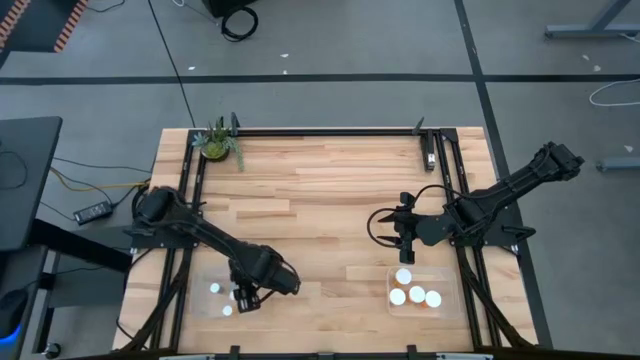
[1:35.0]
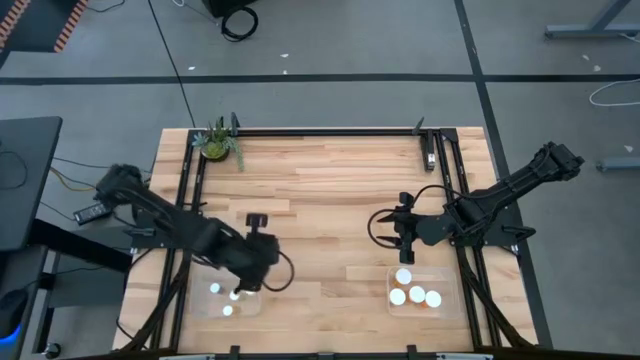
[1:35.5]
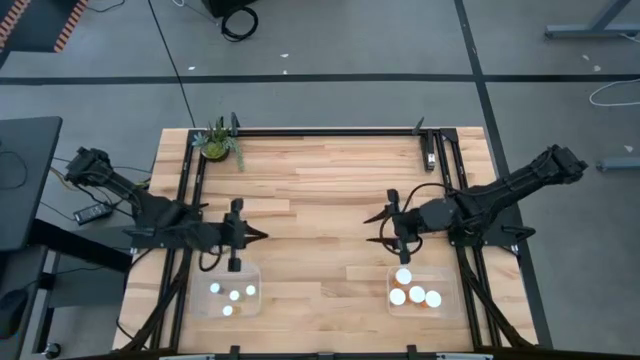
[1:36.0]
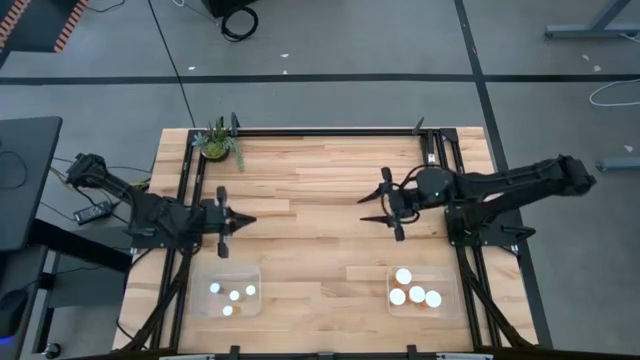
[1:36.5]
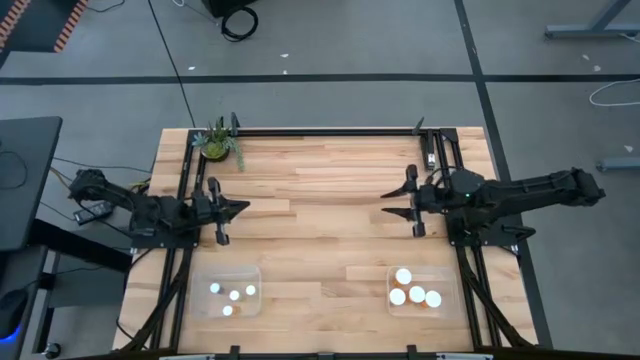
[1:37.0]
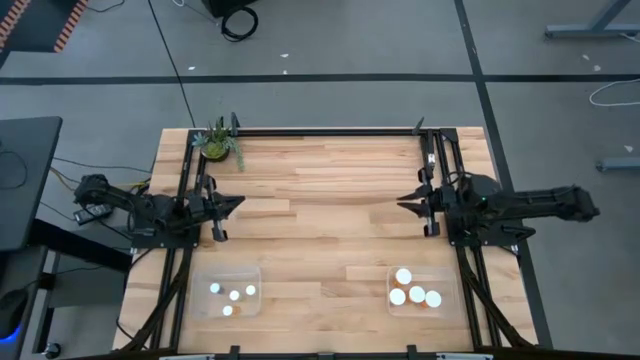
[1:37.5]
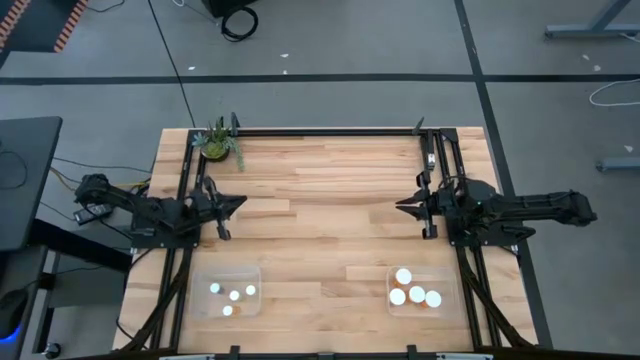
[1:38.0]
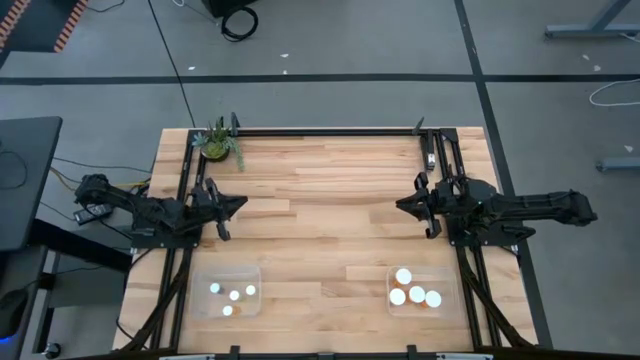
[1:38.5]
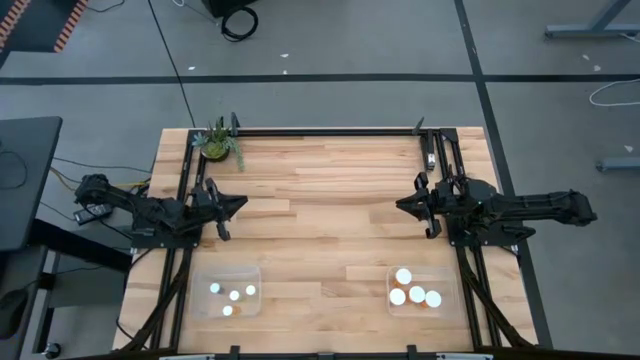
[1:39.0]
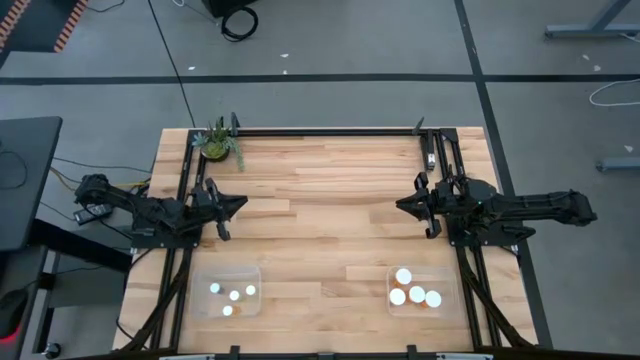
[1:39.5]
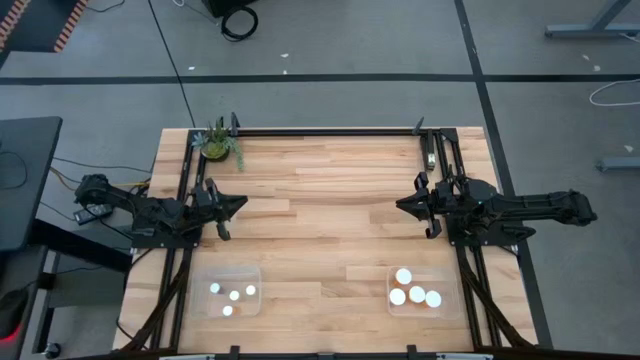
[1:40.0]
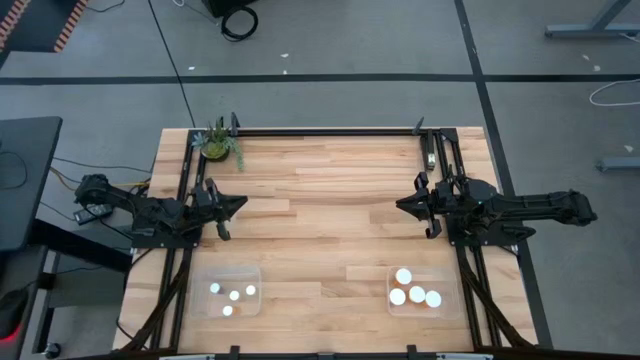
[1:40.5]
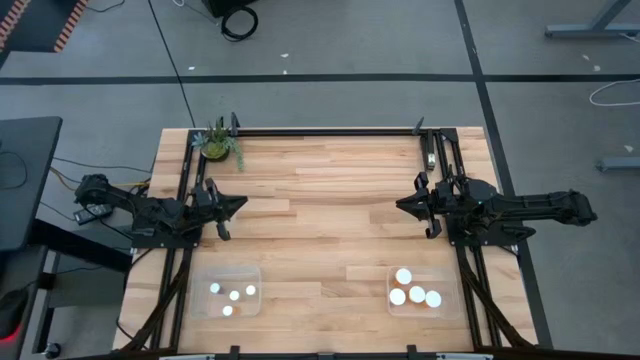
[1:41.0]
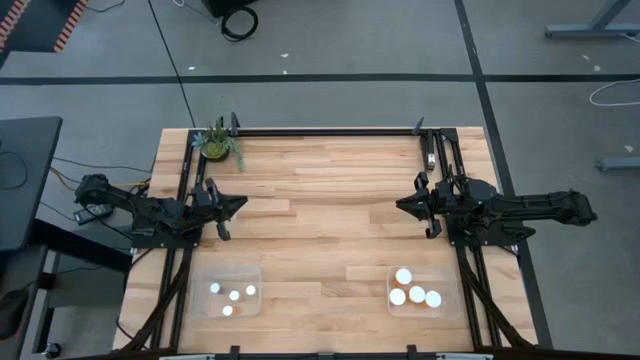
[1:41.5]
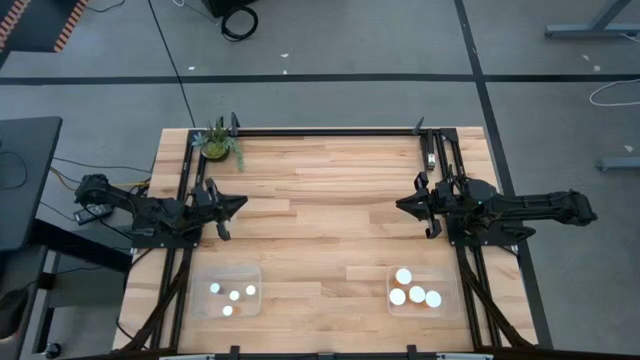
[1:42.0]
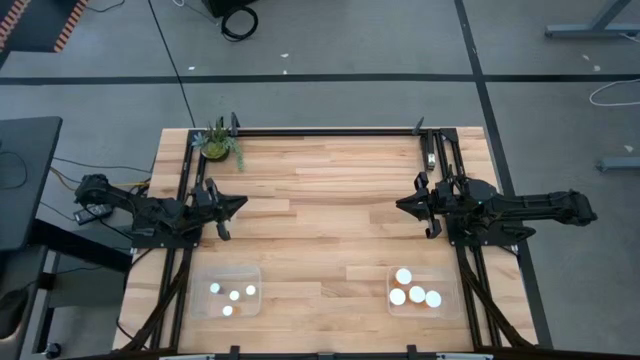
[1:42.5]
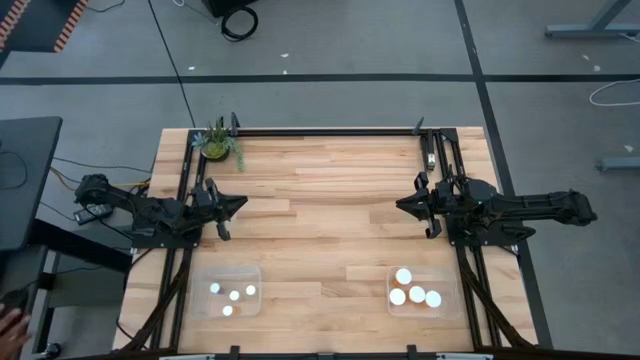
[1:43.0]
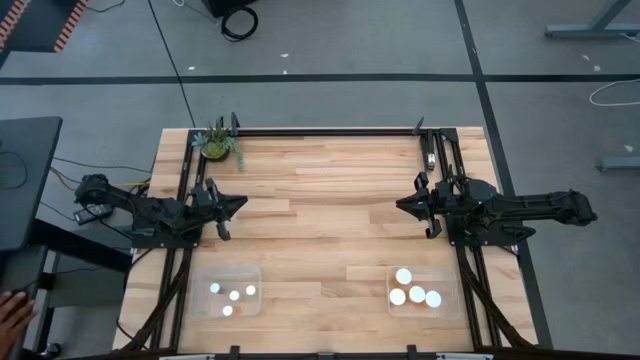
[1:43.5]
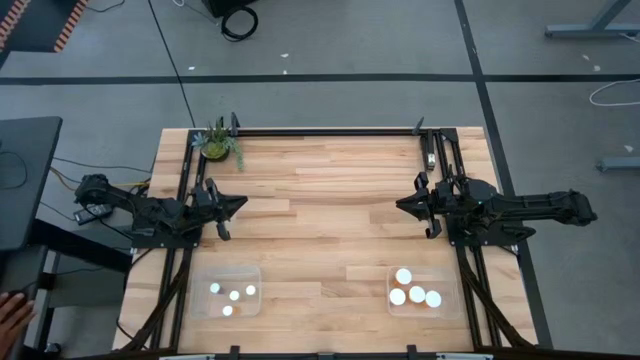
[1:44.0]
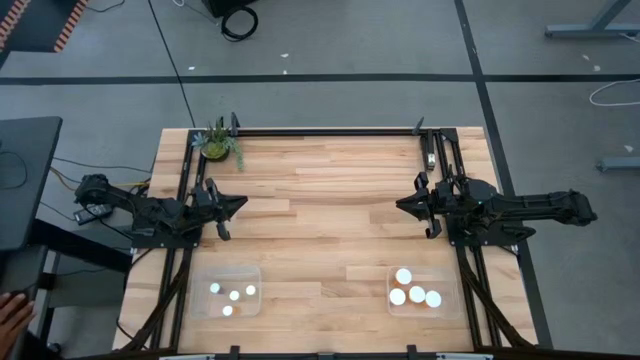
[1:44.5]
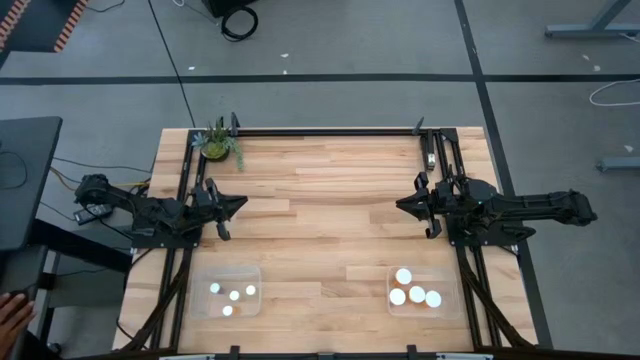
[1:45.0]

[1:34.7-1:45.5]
Task: Pick and place medicine bottles into bin by pill shape (circle, oval)
Return to Home Position

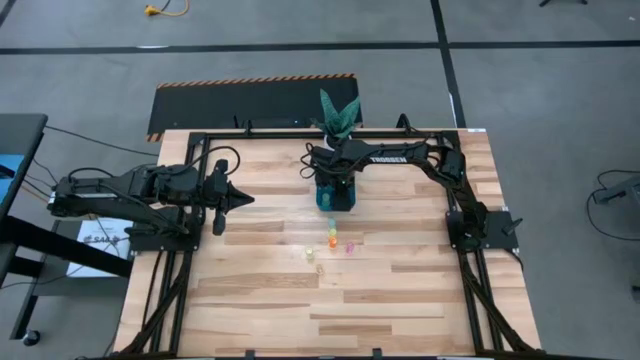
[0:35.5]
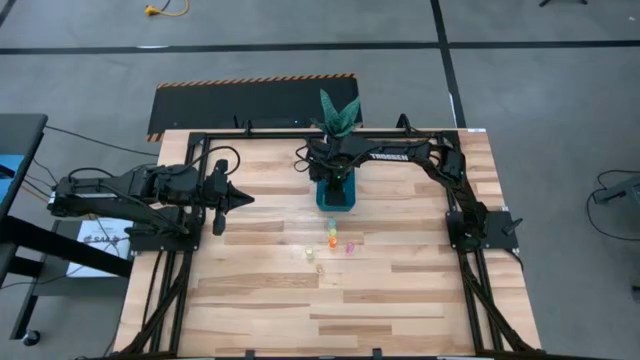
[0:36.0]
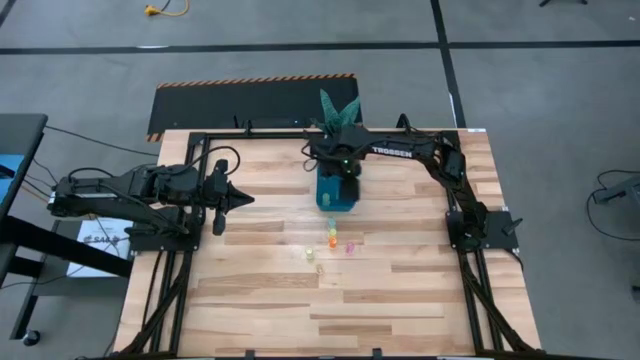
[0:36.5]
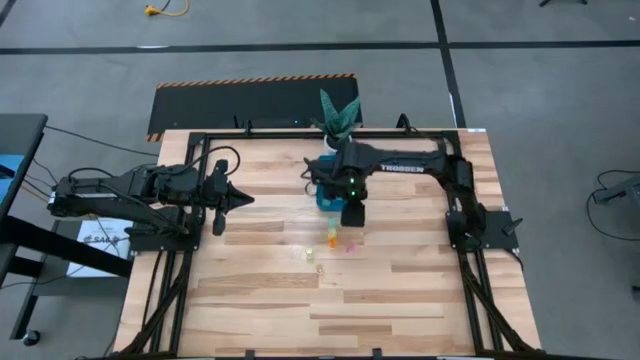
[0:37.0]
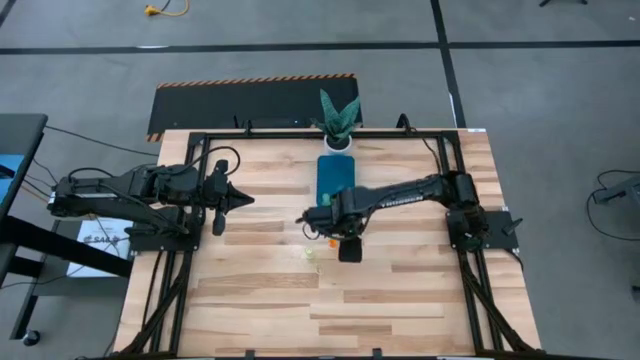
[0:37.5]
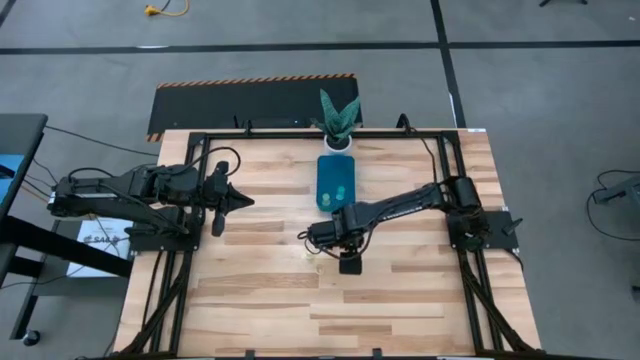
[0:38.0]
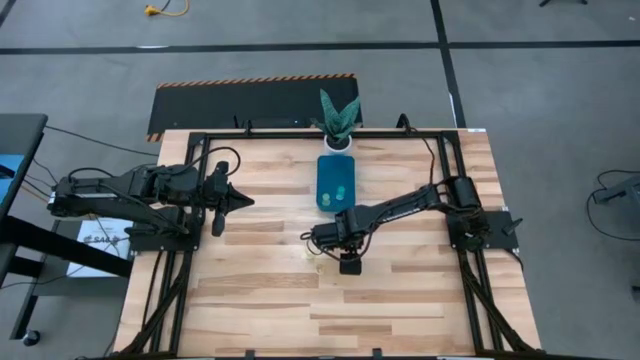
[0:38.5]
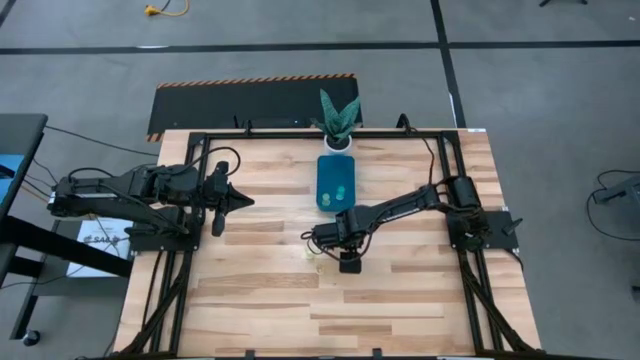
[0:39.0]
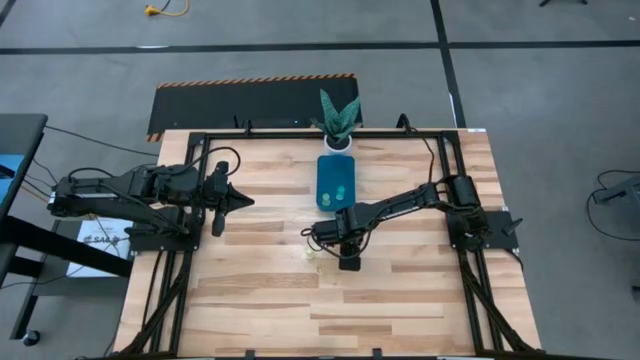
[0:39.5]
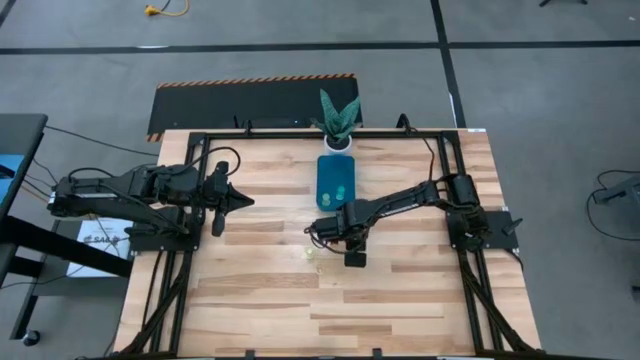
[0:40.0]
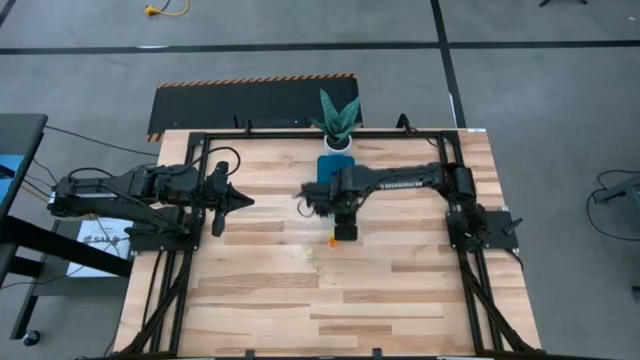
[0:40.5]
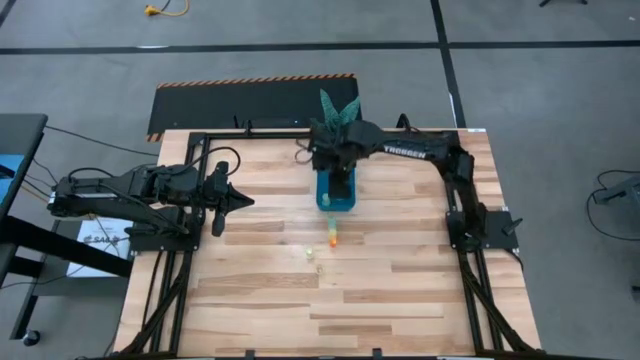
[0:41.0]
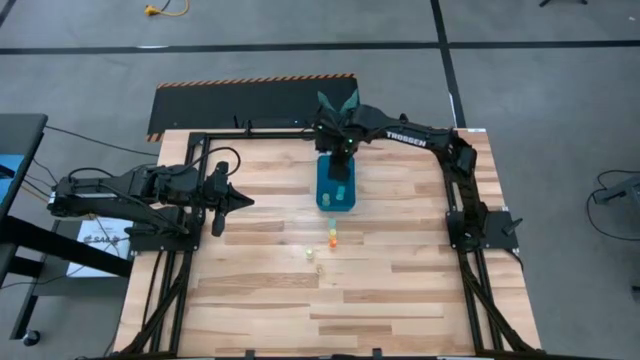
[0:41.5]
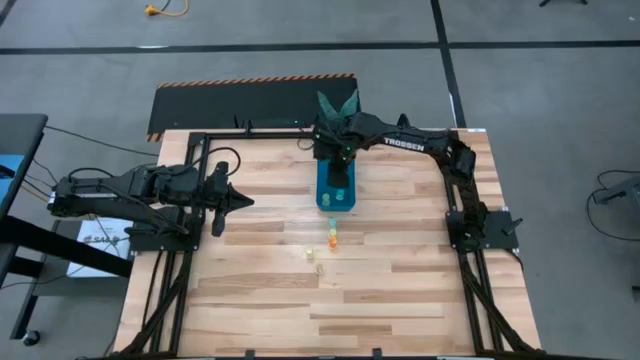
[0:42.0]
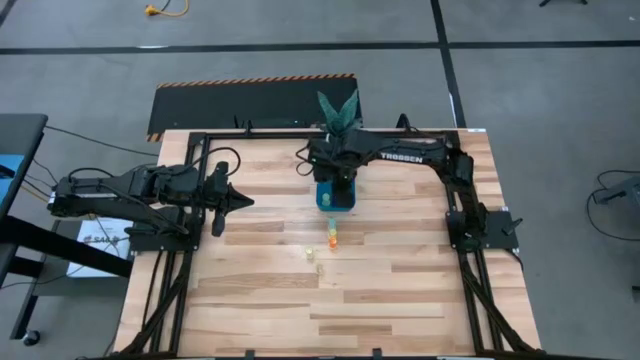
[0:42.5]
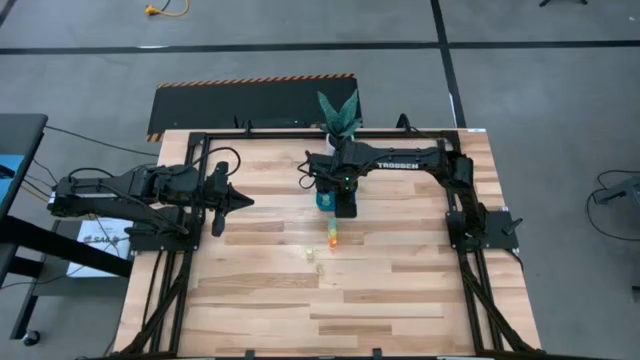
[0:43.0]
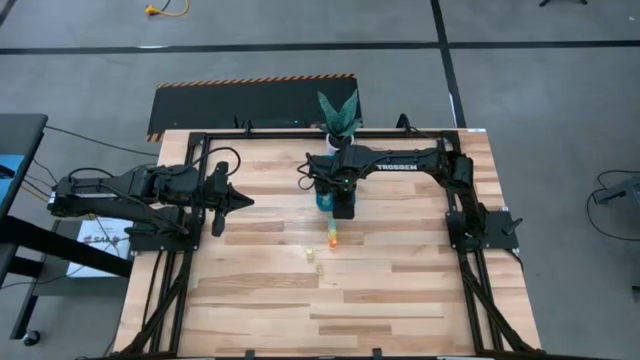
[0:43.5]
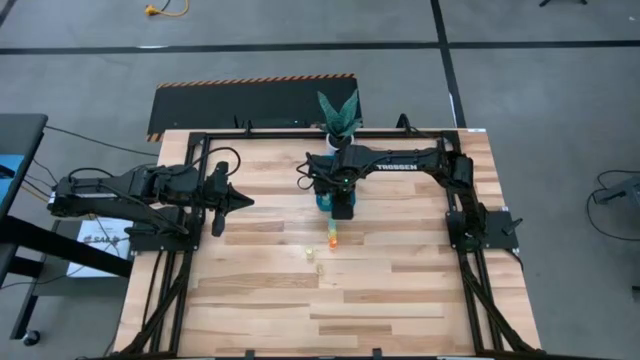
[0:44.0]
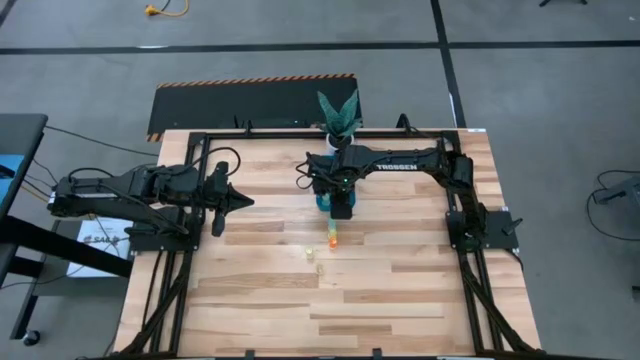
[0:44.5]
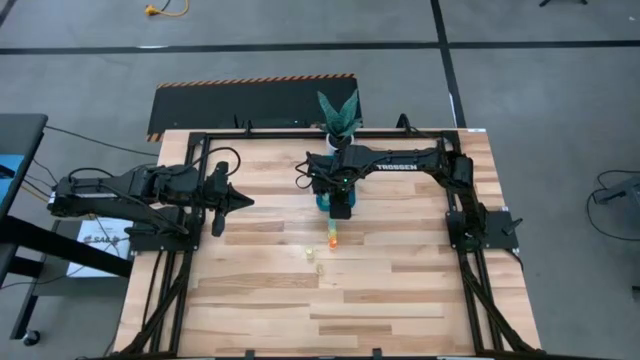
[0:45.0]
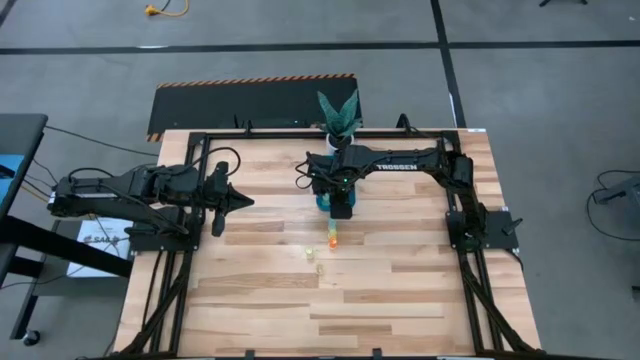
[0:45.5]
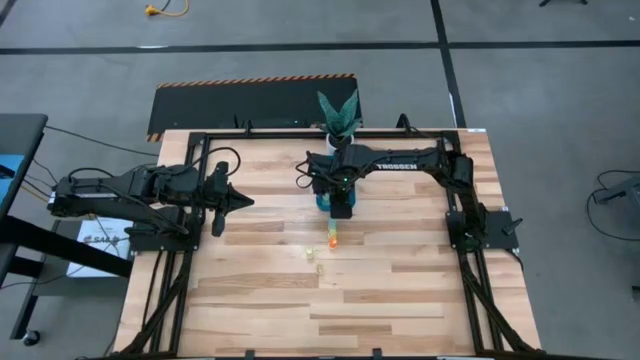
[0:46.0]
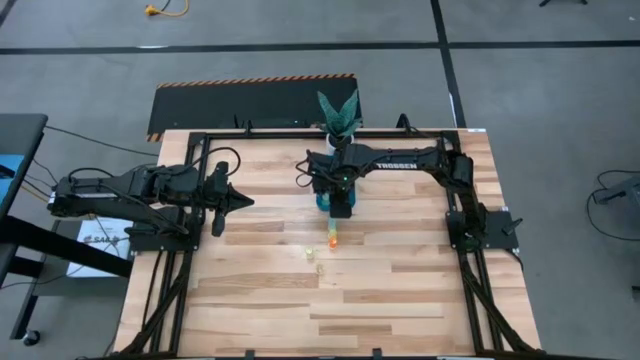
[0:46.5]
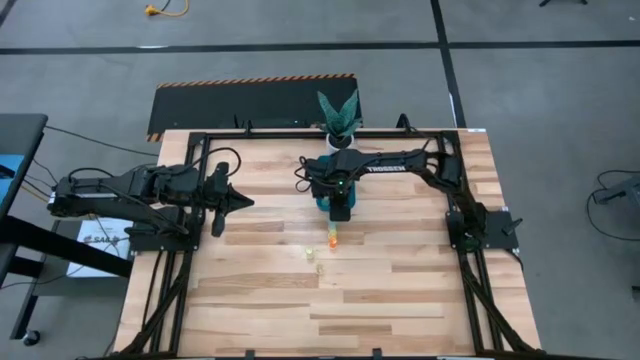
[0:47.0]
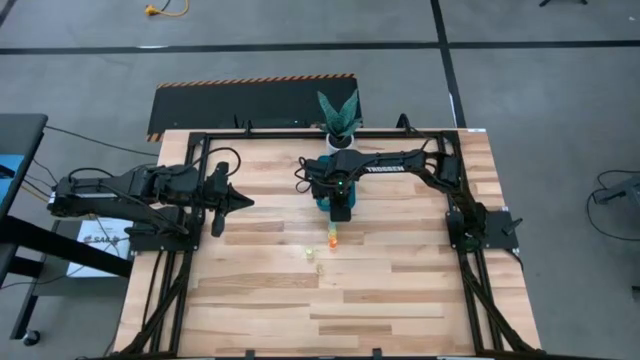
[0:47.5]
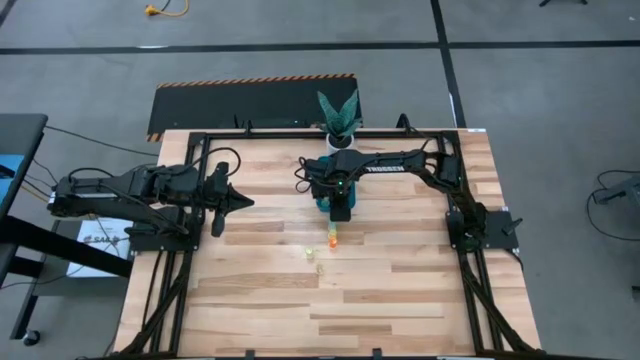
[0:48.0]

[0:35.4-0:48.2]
Task: Pick and place pill bottles into a basket
Put the pink pill bottle into the blue bin
